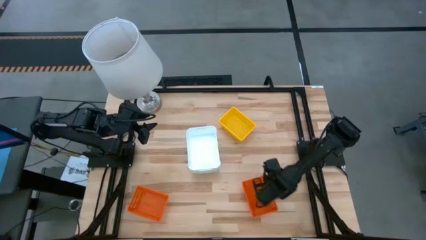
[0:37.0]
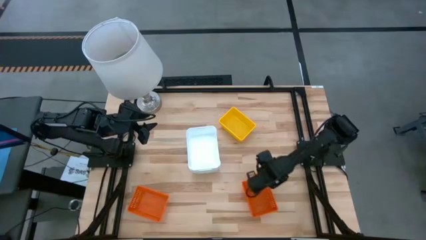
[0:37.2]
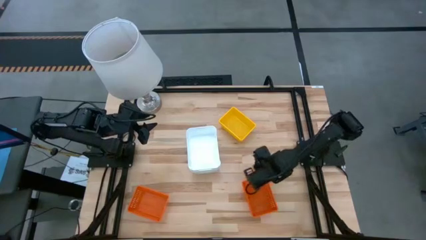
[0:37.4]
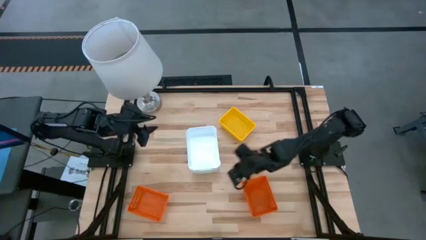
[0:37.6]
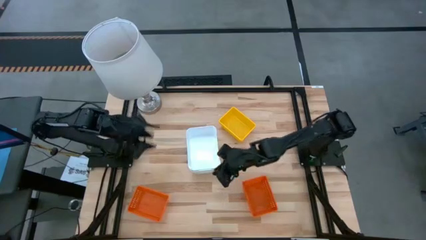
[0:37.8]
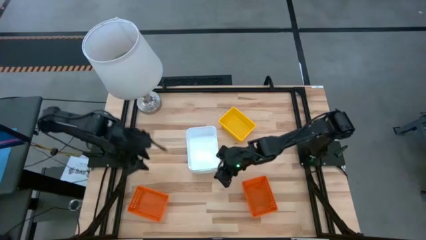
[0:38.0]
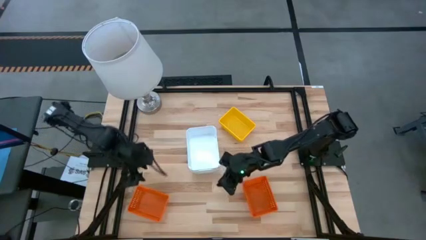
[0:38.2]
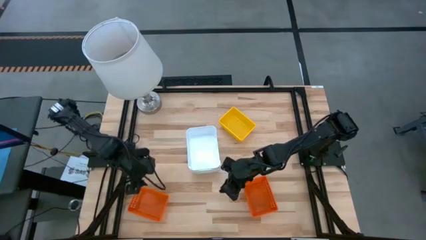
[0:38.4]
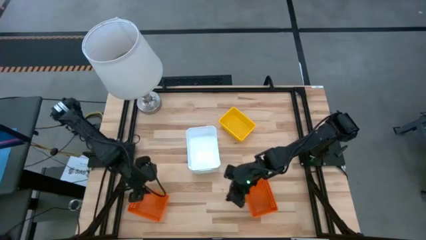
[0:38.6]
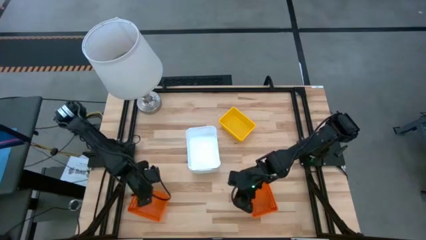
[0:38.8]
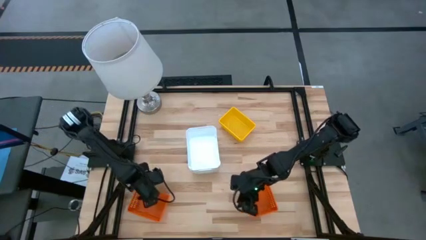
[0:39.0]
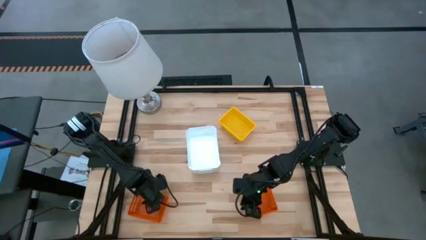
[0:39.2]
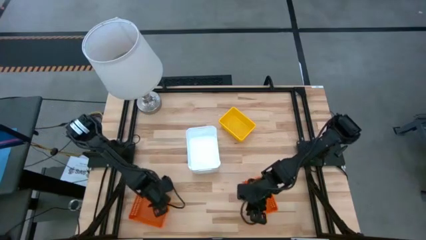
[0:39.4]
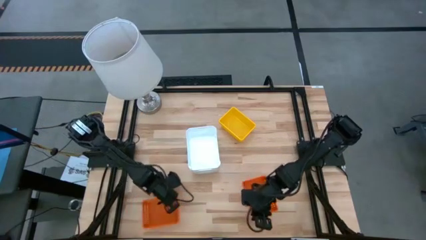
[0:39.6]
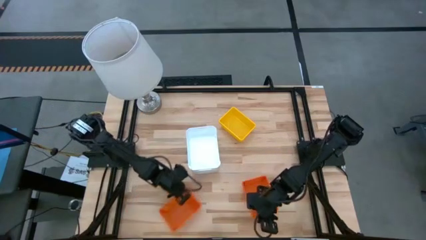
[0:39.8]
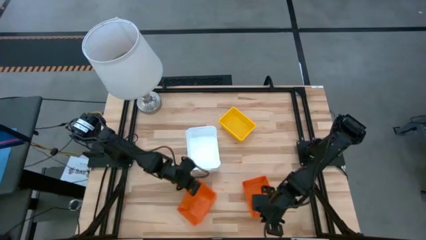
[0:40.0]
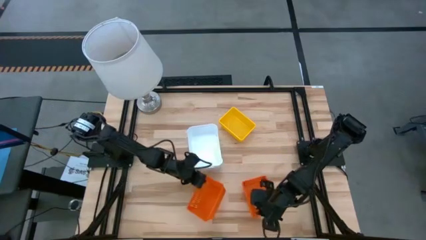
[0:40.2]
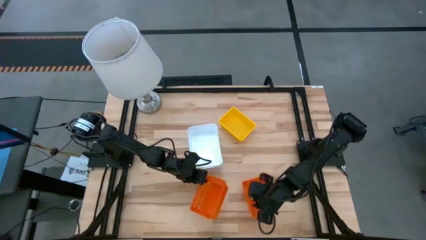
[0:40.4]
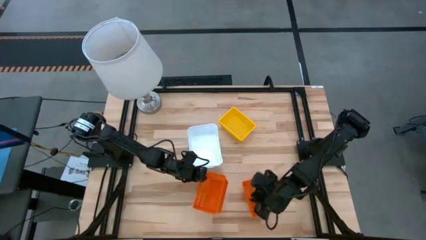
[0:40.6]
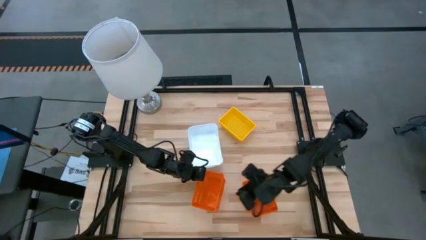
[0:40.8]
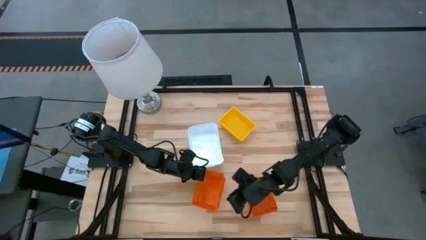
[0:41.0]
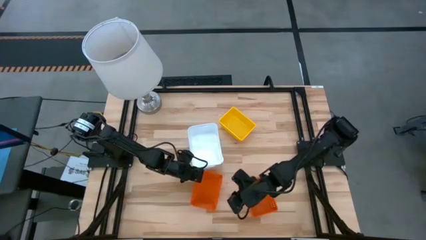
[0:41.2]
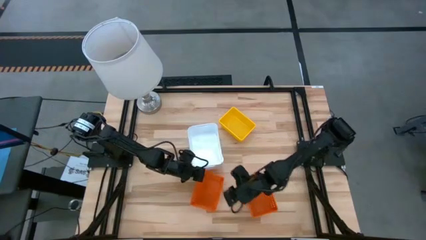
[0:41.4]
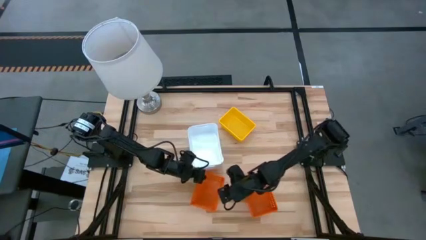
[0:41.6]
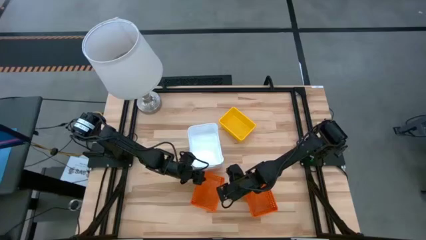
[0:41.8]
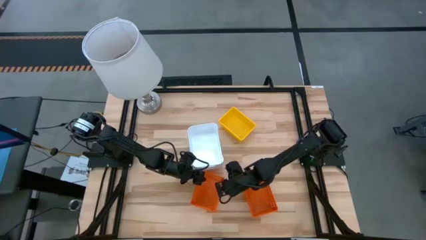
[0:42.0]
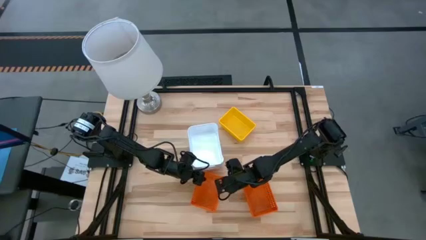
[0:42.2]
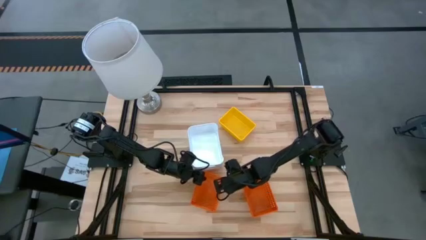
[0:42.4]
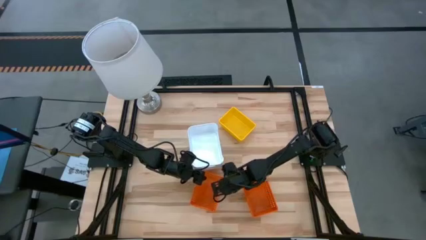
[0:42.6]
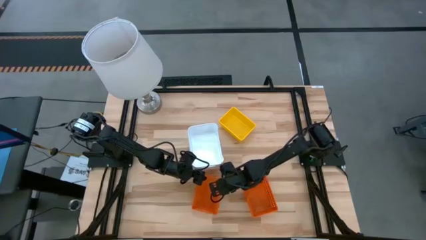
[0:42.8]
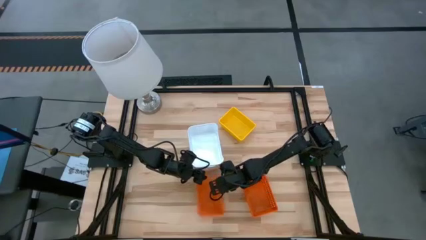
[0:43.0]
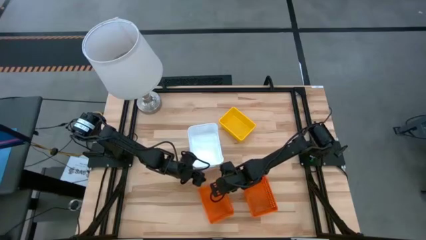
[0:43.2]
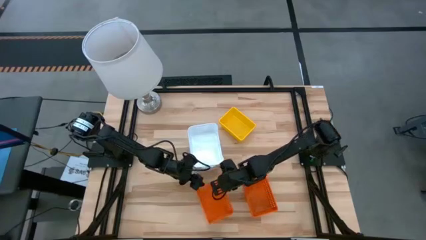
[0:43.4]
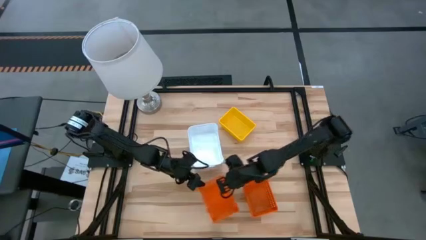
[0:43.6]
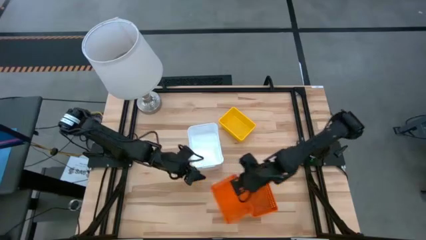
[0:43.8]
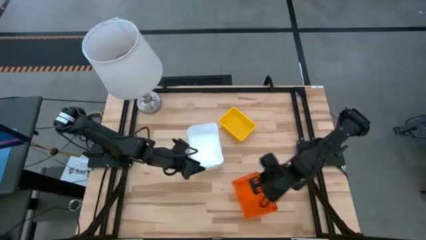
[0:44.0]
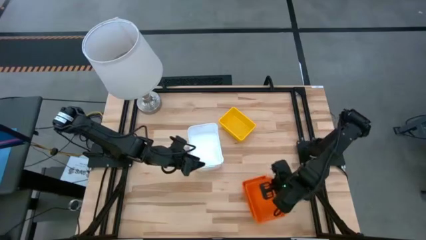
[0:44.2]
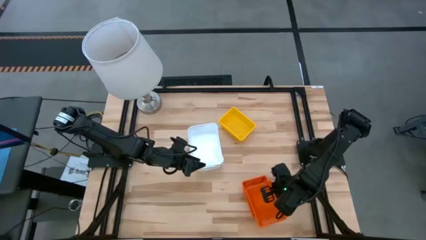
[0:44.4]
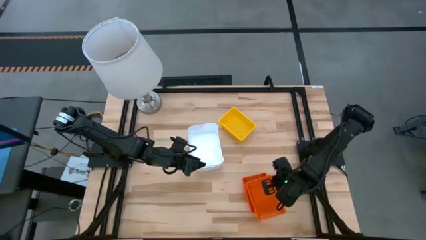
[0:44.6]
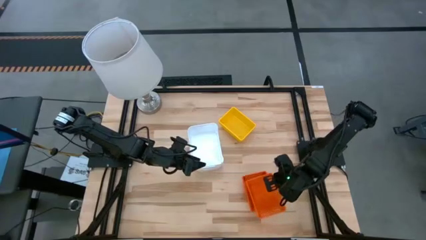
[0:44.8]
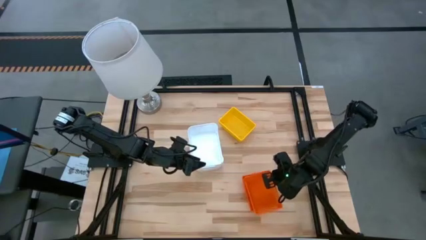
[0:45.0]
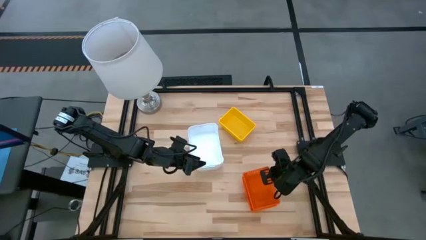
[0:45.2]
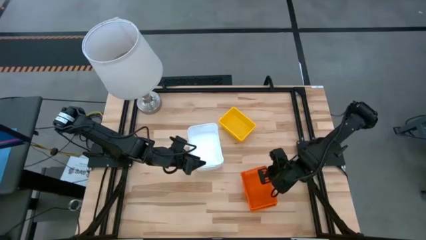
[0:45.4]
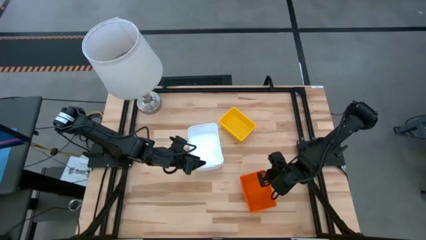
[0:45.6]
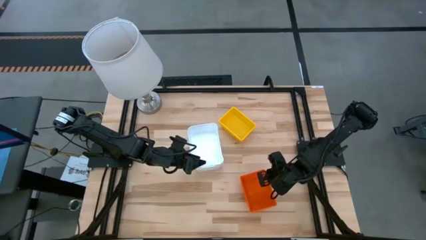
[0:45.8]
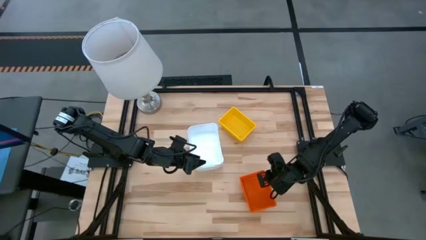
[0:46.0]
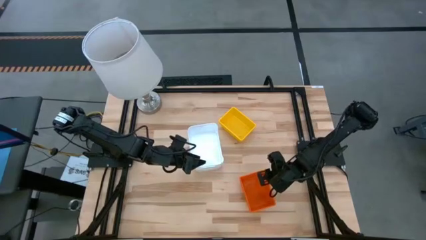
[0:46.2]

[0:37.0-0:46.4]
Stack the left orange bin on the right orange bins

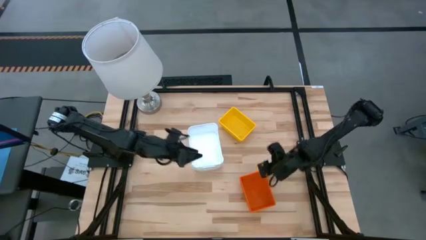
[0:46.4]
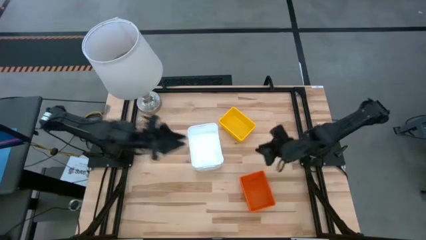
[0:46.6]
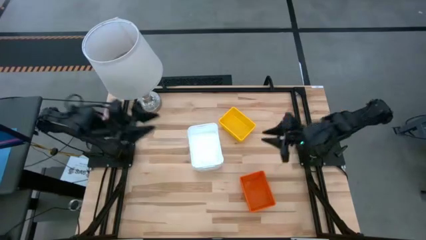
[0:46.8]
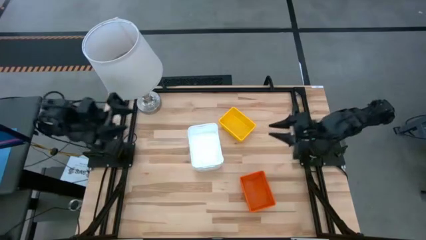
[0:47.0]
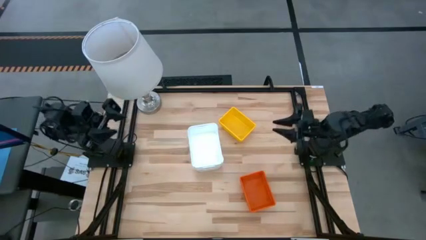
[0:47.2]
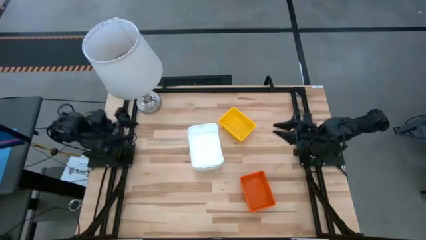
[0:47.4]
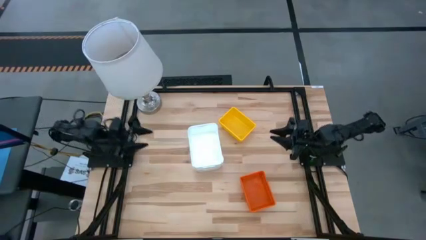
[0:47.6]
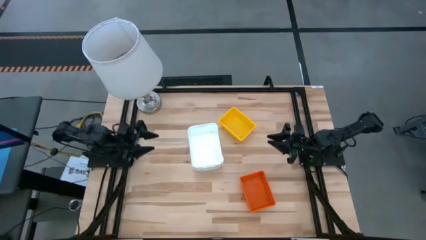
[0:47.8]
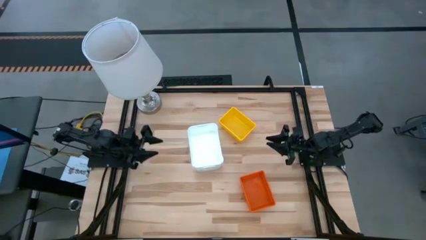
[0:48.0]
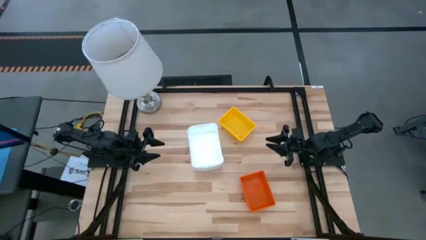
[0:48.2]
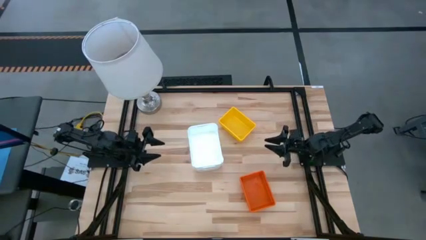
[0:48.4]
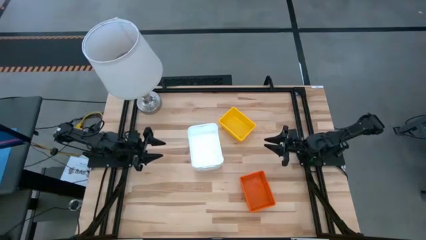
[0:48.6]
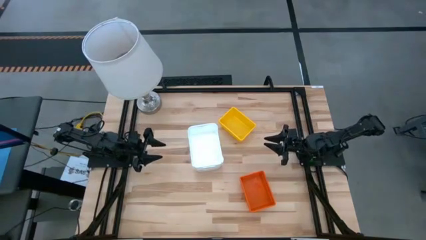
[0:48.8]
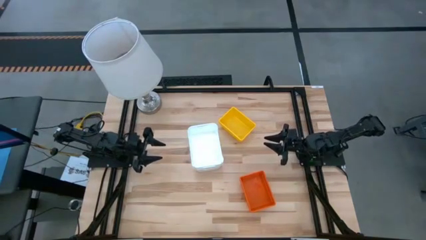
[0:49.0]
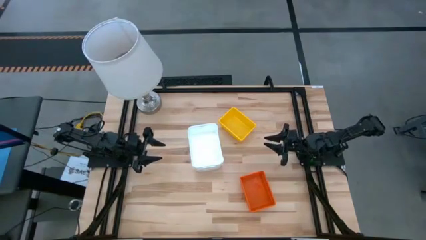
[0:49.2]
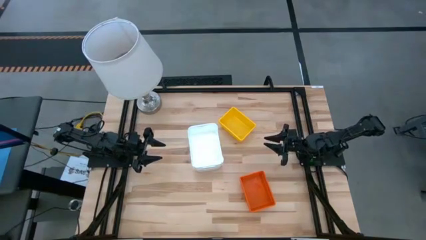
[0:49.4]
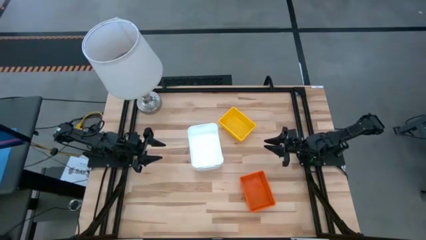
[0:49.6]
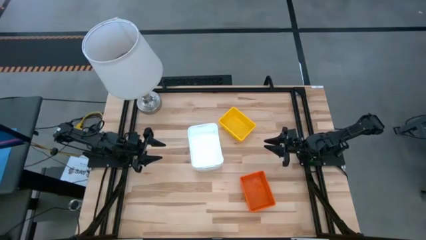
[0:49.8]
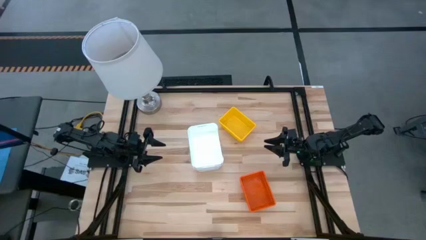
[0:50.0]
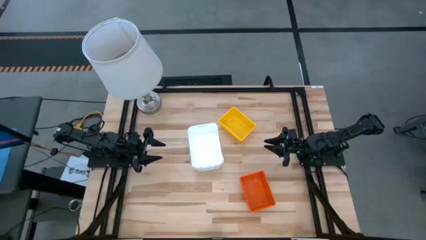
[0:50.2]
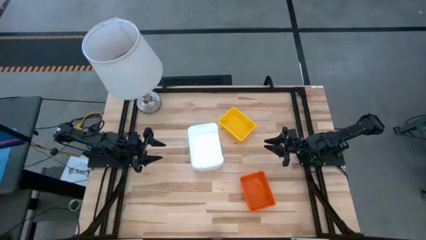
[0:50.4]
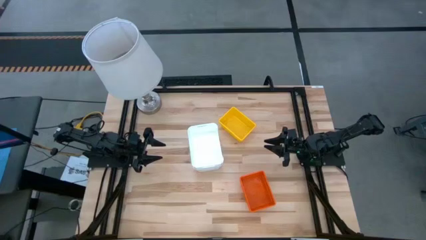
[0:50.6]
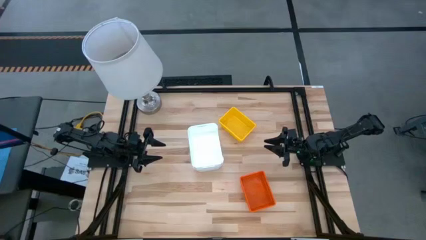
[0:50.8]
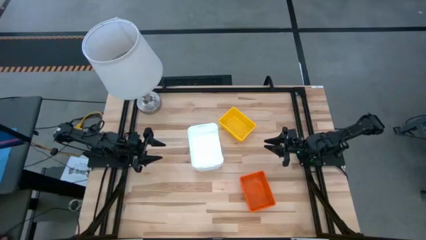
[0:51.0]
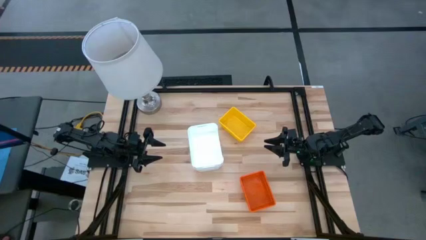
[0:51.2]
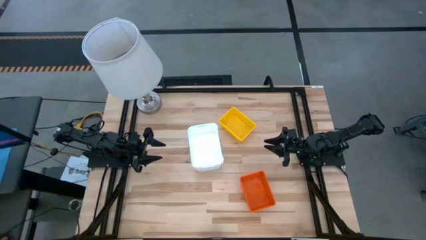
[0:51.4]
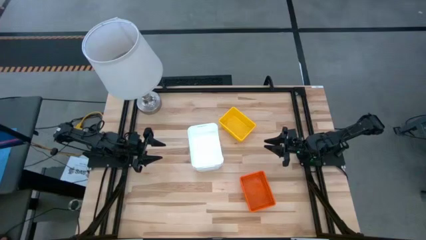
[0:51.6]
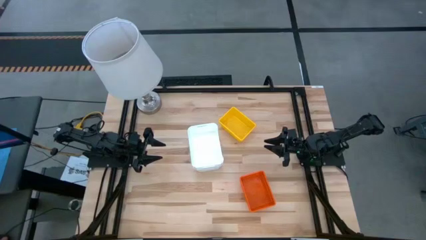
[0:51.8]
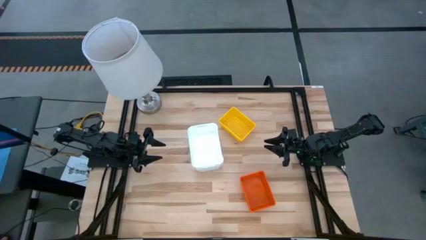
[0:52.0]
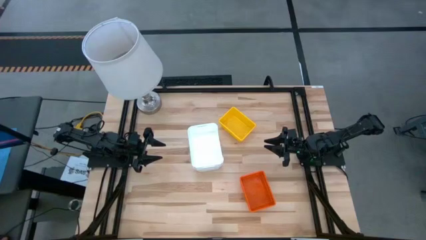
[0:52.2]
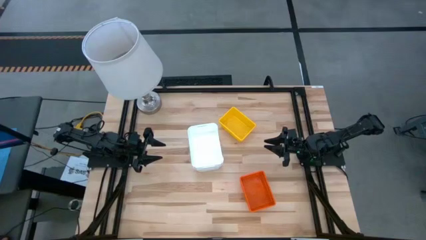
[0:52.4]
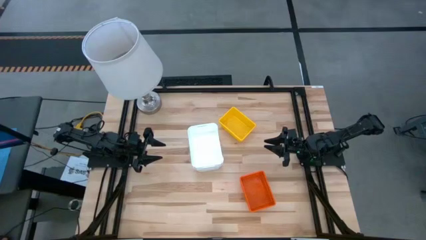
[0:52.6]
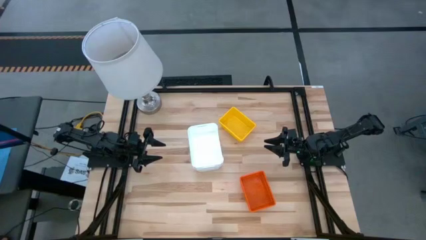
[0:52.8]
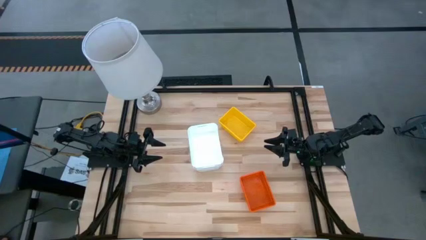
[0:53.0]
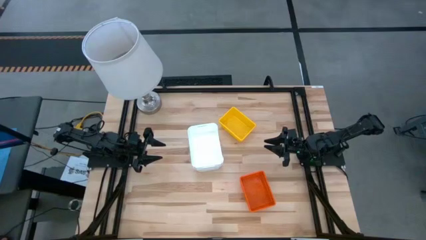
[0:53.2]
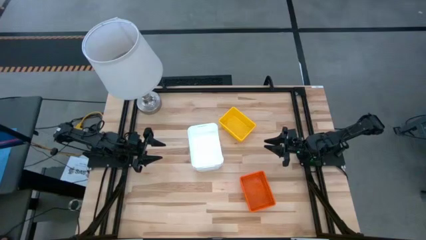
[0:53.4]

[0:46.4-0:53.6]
Return to Home Position
